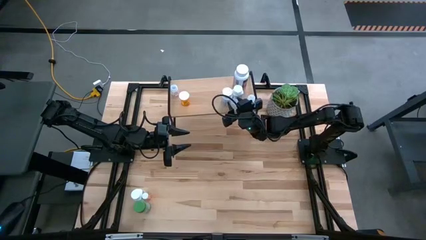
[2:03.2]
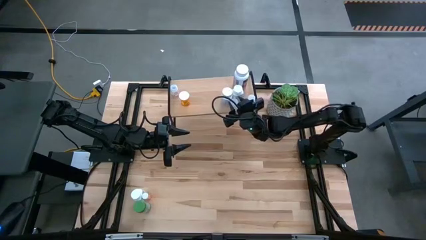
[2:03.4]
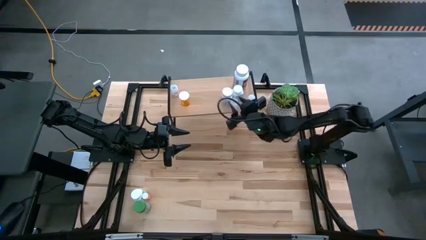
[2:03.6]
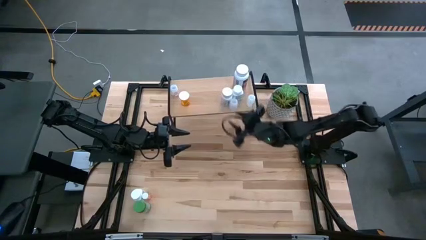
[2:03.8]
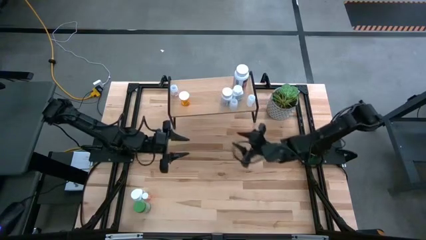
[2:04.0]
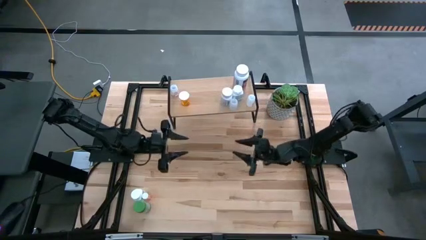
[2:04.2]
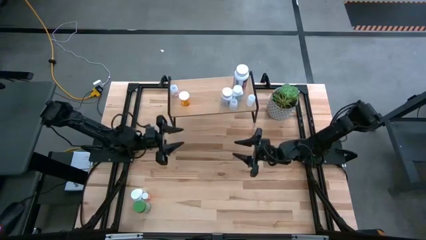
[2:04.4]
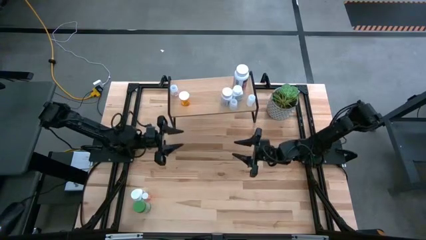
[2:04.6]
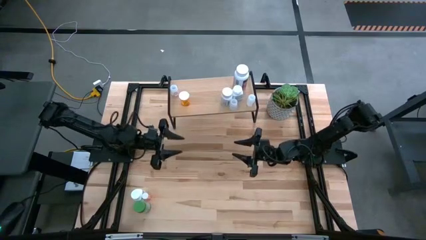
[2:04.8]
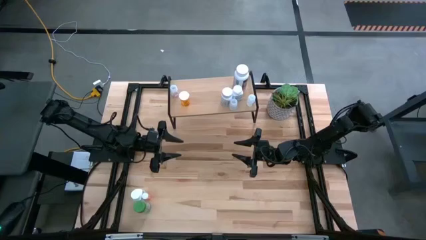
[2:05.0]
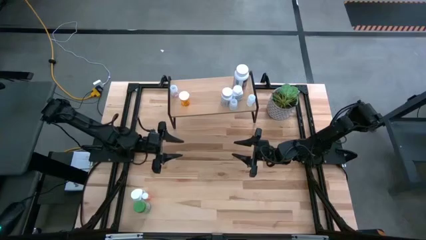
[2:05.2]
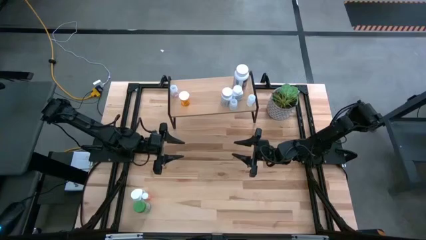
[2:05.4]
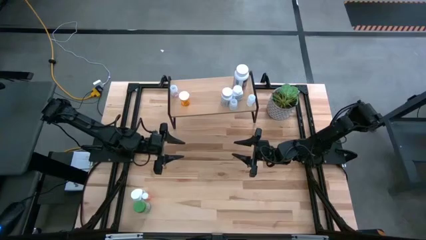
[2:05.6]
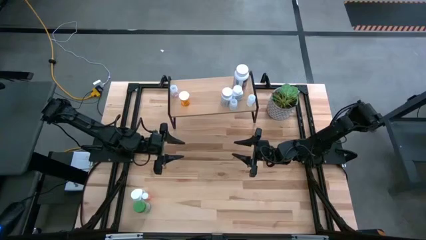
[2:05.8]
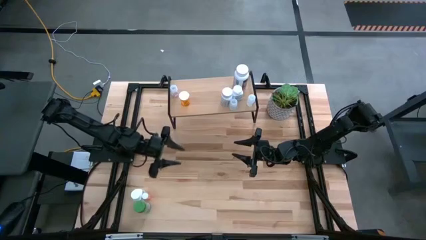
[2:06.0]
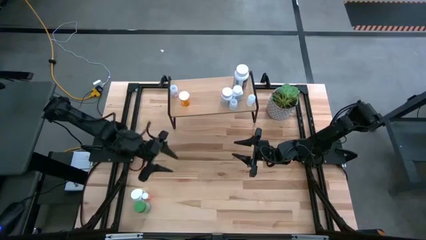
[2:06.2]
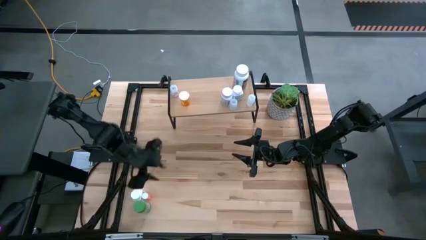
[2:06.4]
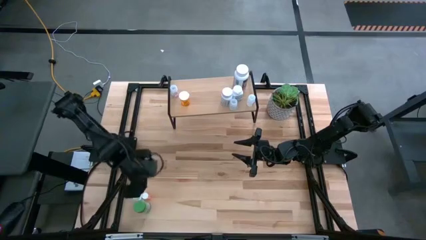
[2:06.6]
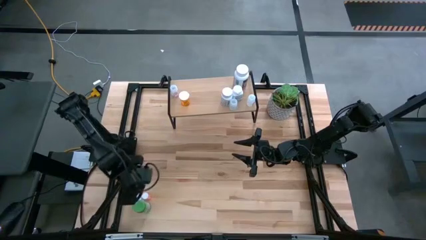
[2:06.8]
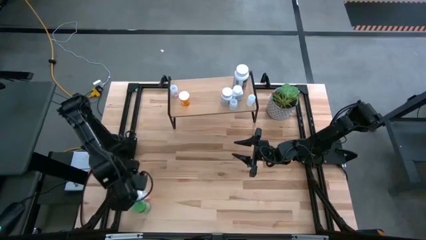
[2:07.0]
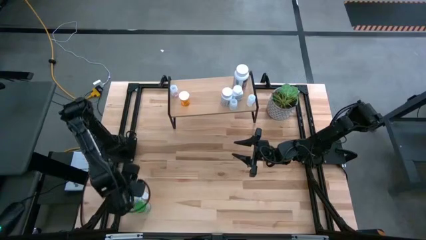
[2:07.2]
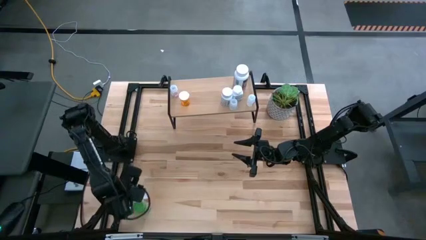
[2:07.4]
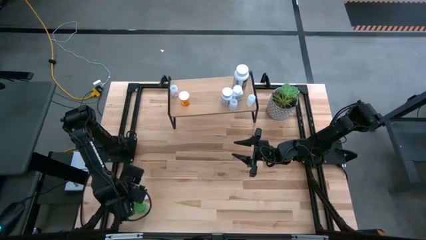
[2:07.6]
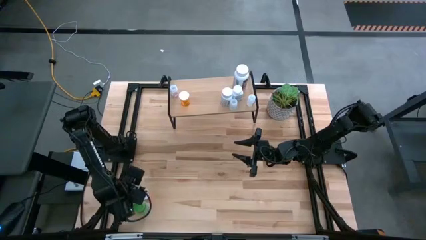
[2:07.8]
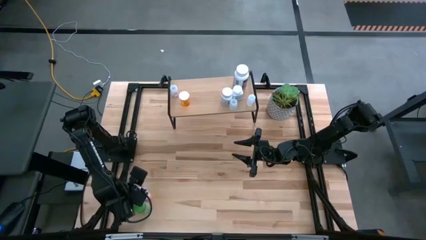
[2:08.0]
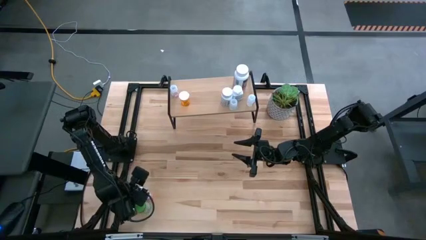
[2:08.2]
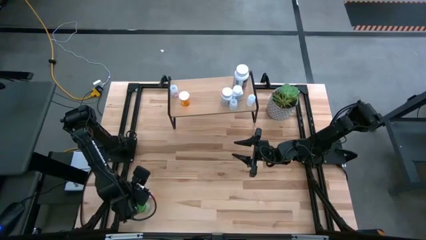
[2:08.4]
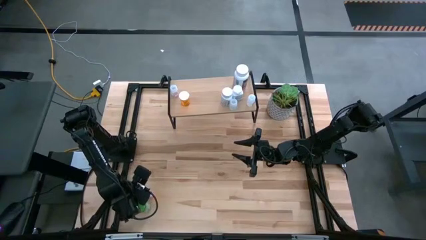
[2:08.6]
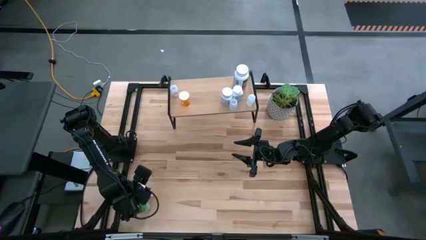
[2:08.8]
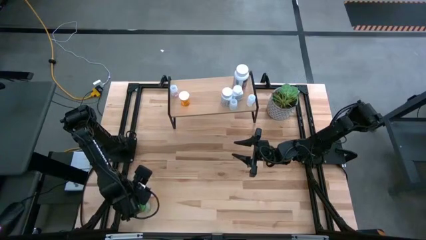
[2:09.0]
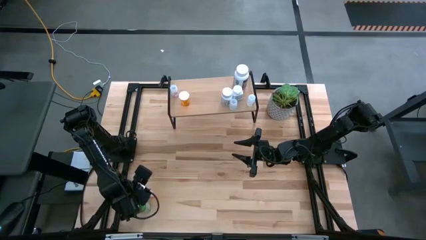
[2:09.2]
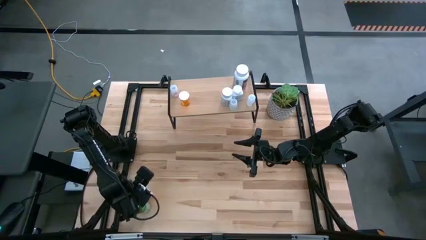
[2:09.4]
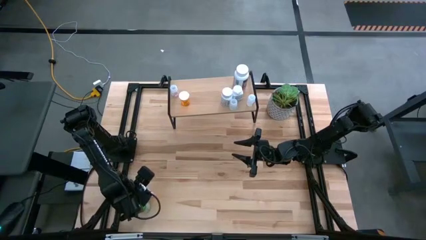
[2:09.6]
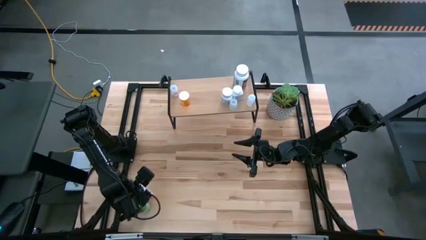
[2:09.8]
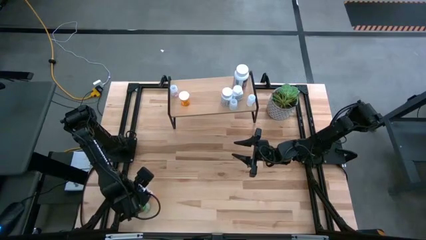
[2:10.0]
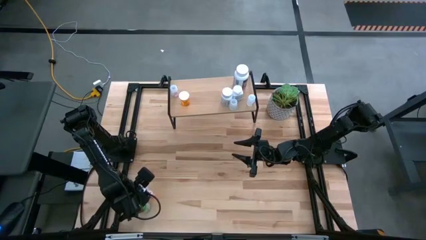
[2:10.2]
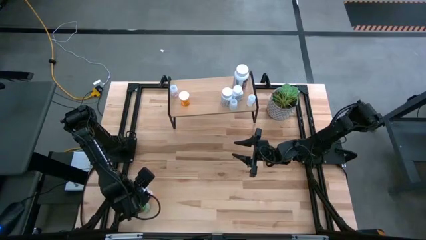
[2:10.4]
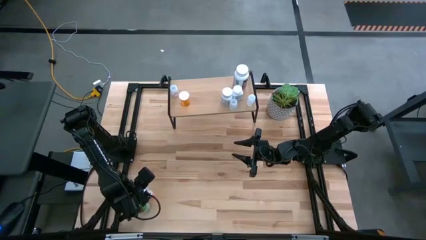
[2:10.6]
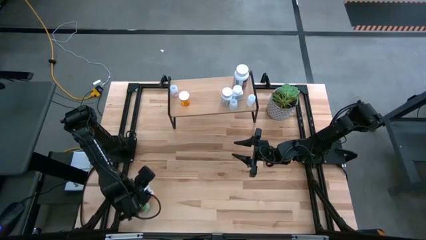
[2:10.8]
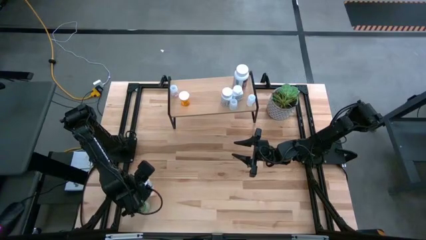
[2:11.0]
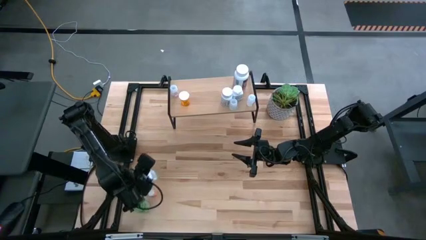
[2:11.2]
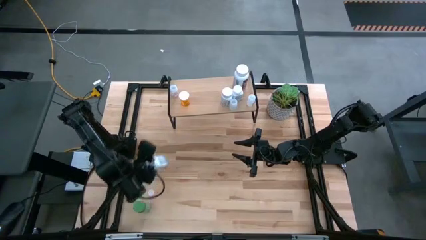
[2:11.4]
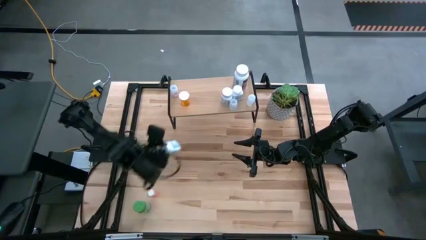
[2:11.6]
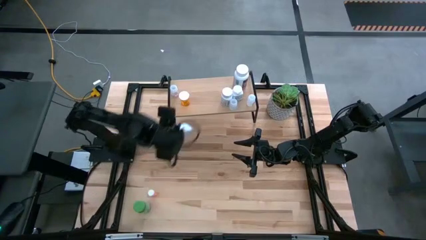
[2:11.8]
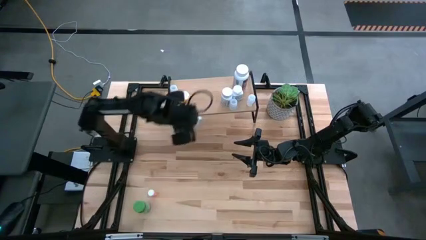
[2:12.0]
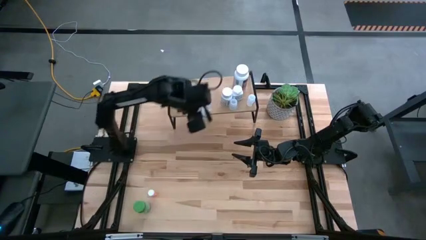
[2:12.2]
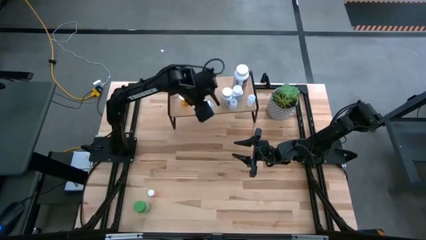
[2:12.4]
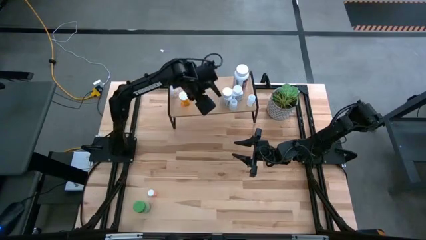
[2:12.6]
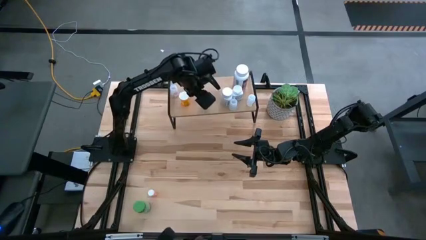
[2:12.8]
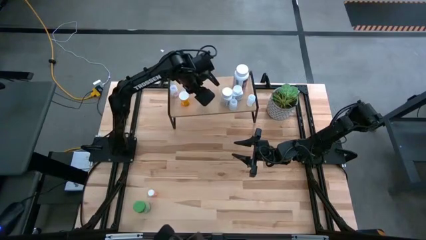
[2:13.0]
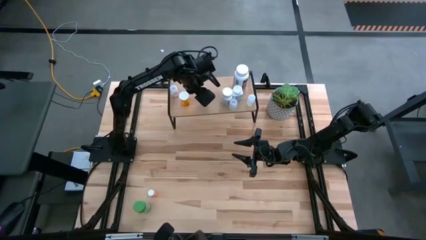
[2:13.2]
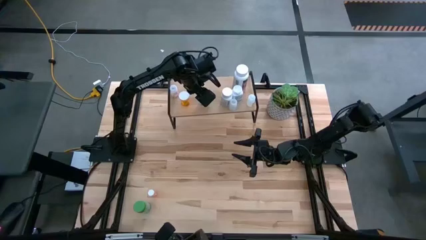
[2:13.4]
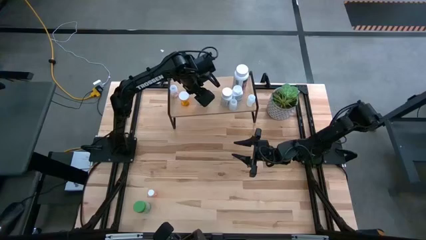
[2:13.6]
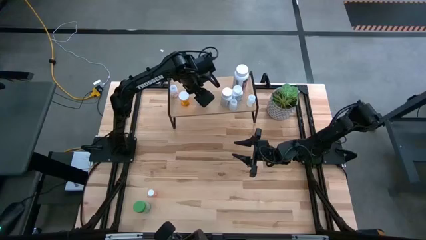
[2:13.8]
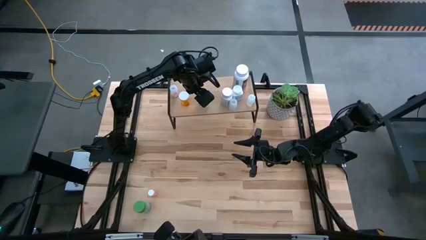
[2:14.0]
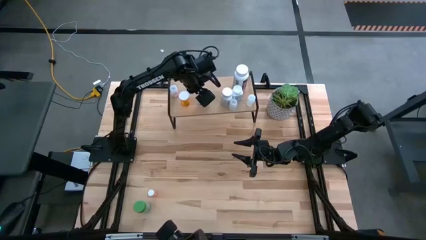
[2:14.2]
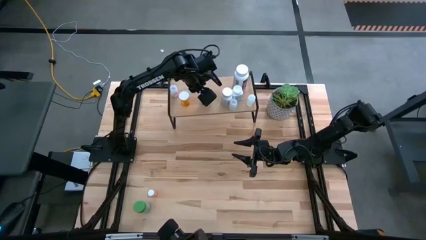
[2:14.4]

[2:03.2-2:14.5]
Task: Pick and place medicine bottles onto shelf by color
Put the white pill bottle on the shelf
